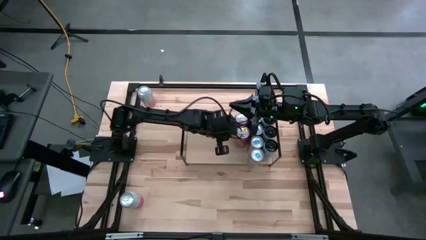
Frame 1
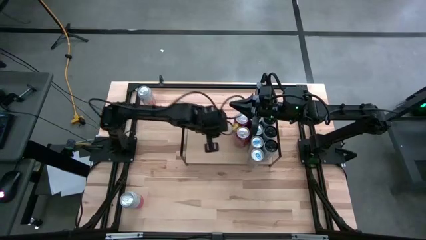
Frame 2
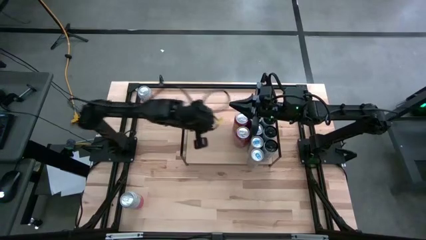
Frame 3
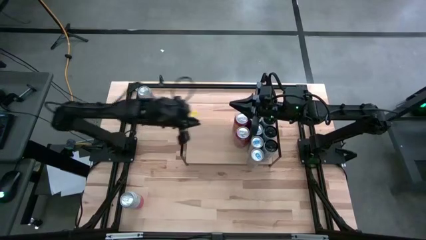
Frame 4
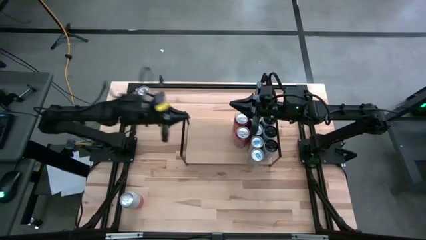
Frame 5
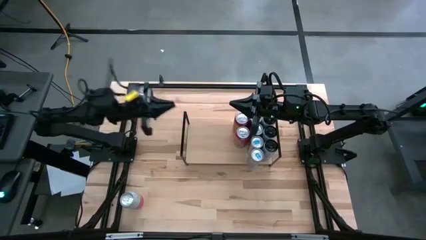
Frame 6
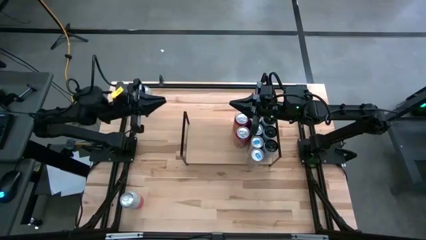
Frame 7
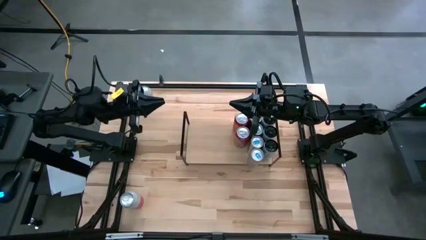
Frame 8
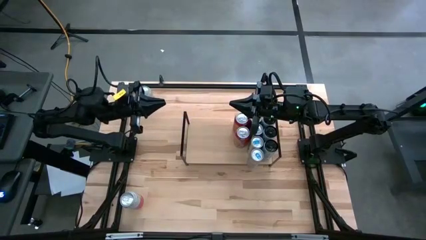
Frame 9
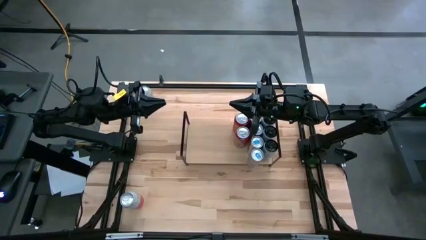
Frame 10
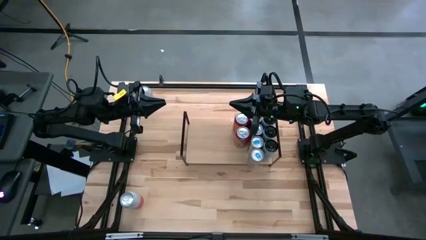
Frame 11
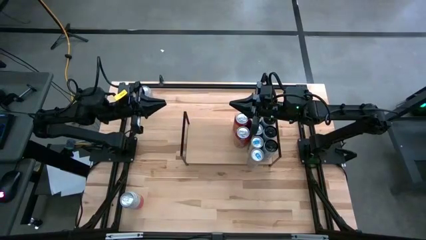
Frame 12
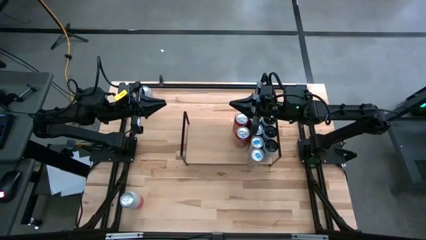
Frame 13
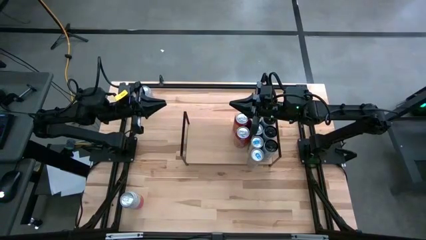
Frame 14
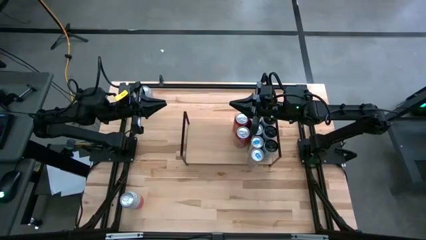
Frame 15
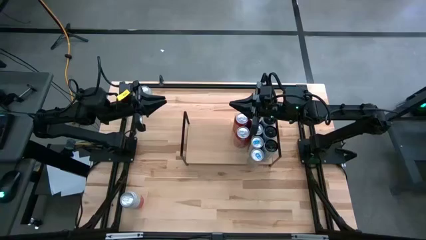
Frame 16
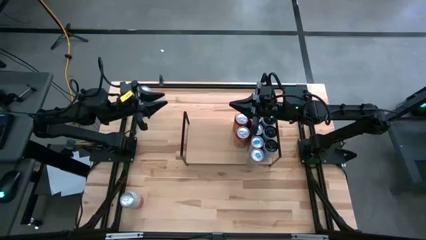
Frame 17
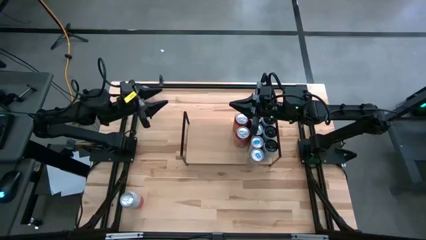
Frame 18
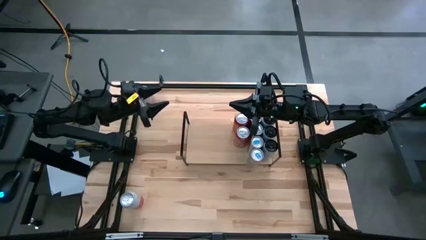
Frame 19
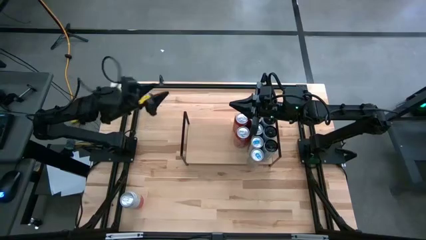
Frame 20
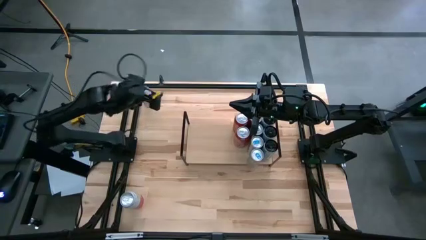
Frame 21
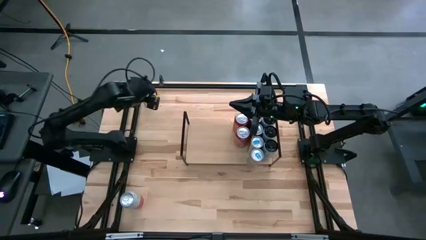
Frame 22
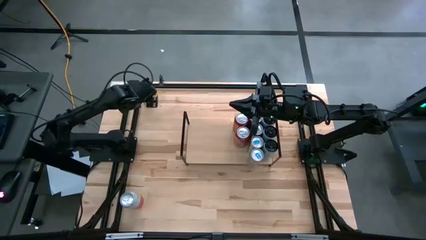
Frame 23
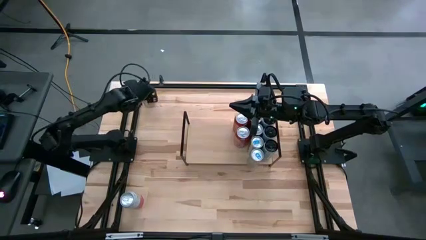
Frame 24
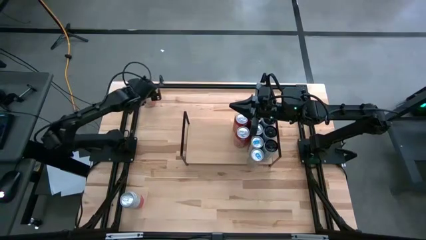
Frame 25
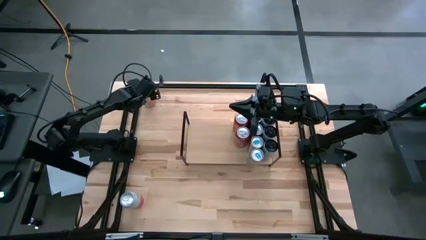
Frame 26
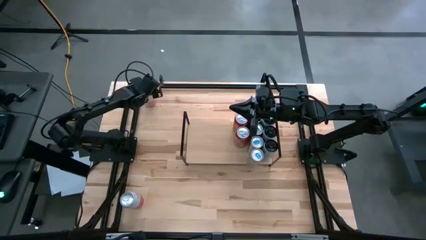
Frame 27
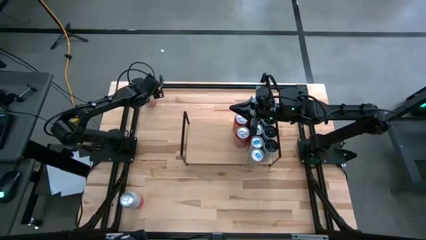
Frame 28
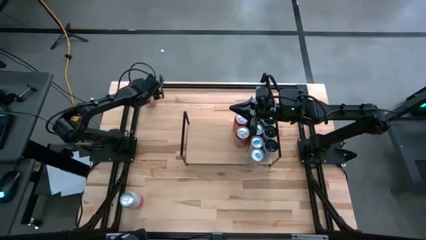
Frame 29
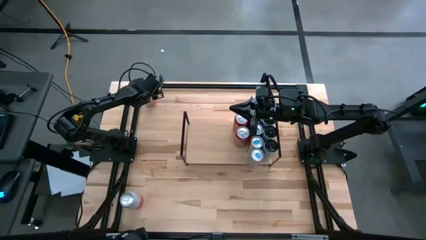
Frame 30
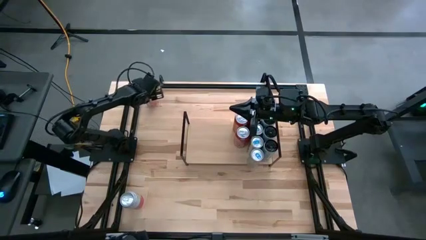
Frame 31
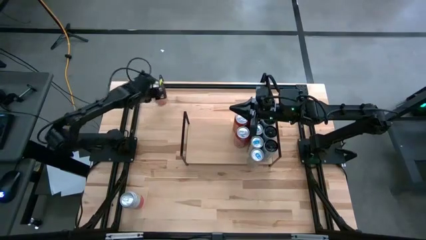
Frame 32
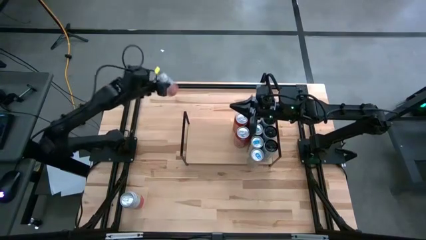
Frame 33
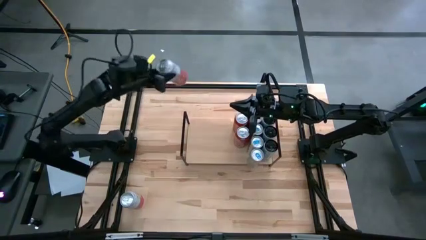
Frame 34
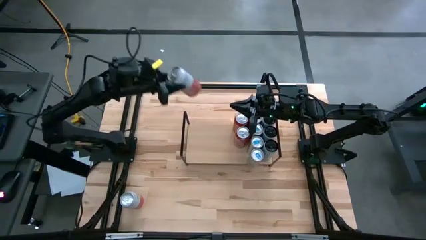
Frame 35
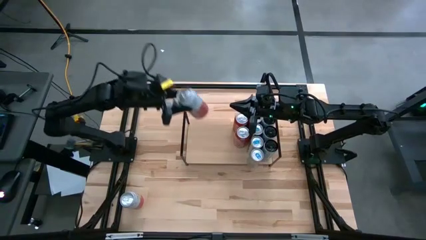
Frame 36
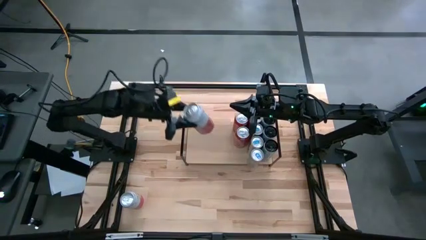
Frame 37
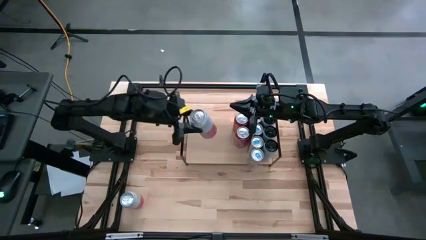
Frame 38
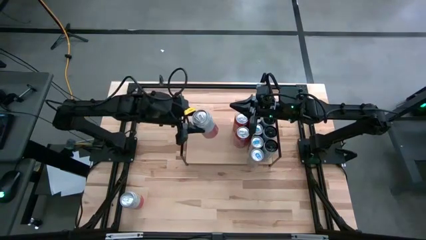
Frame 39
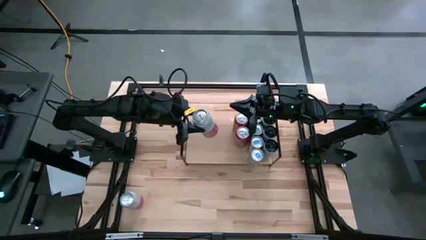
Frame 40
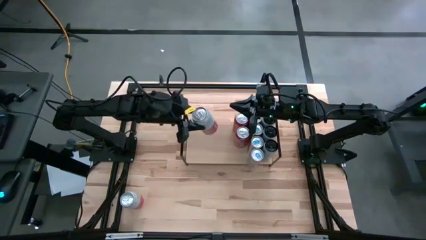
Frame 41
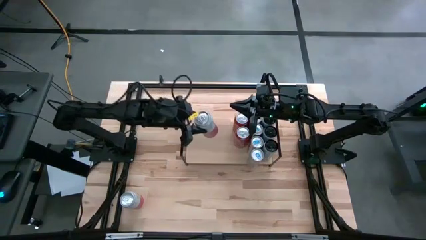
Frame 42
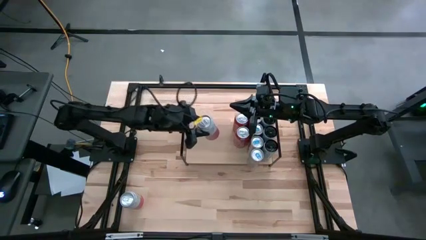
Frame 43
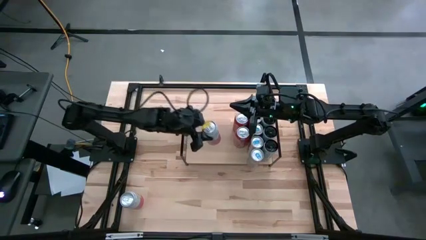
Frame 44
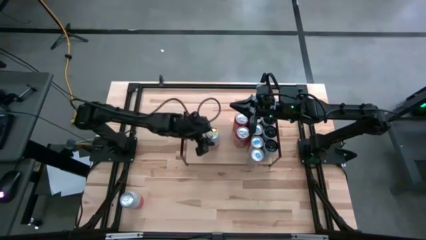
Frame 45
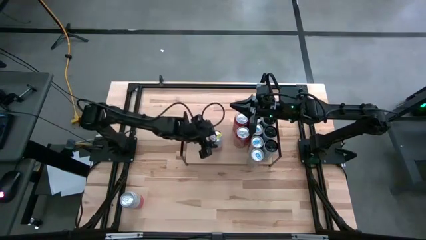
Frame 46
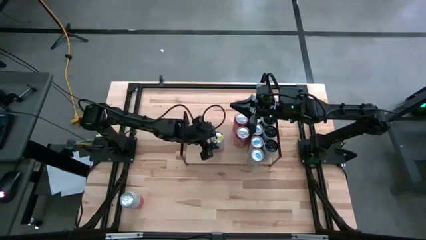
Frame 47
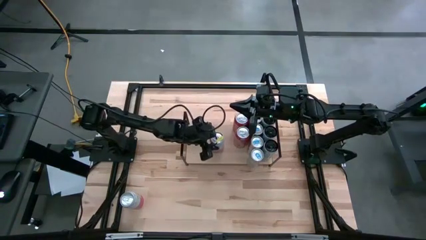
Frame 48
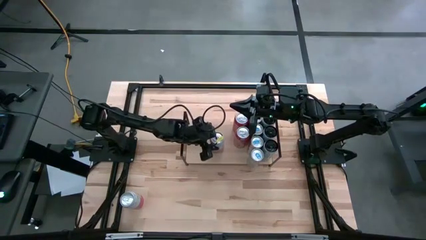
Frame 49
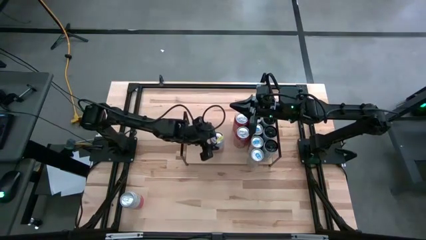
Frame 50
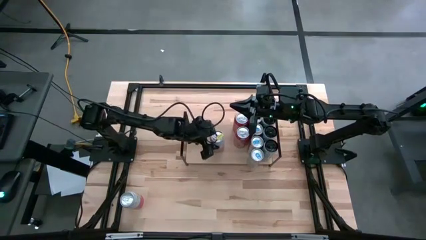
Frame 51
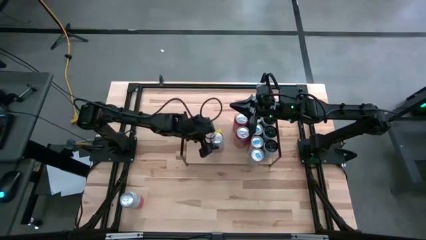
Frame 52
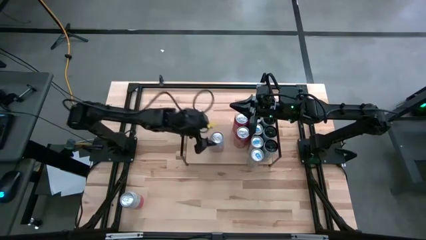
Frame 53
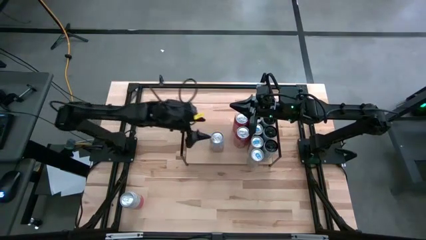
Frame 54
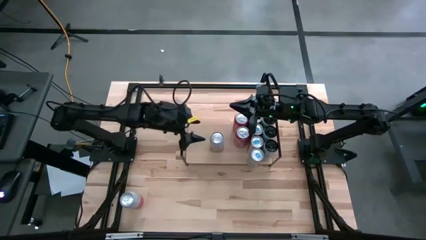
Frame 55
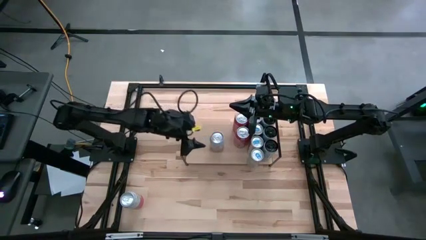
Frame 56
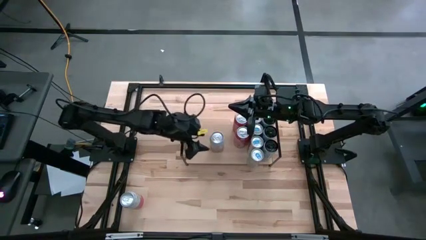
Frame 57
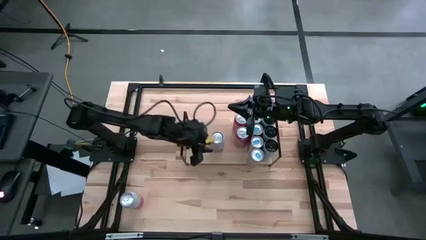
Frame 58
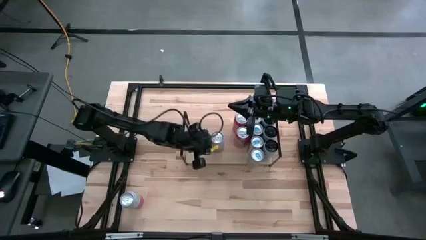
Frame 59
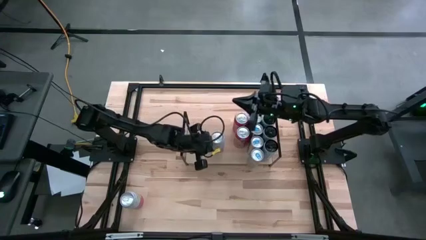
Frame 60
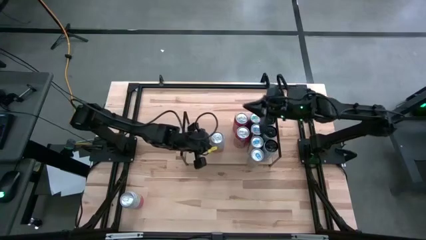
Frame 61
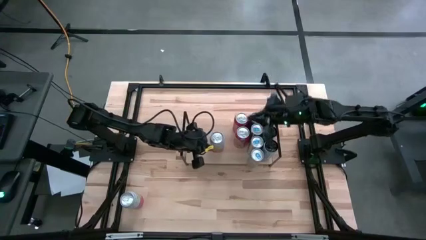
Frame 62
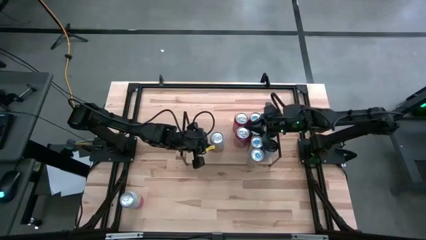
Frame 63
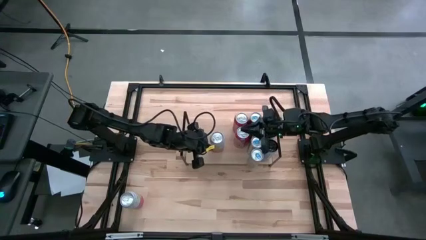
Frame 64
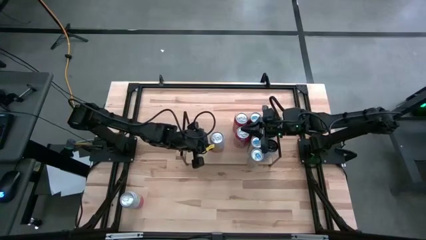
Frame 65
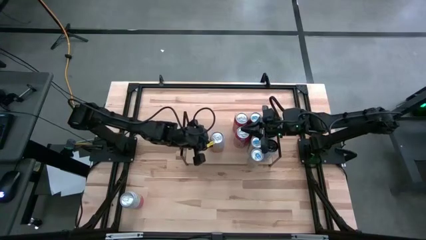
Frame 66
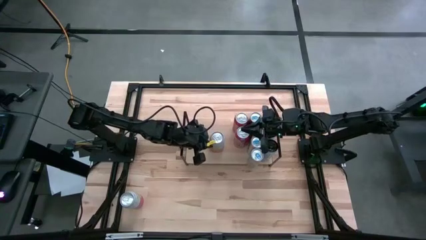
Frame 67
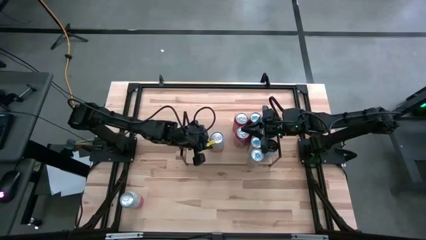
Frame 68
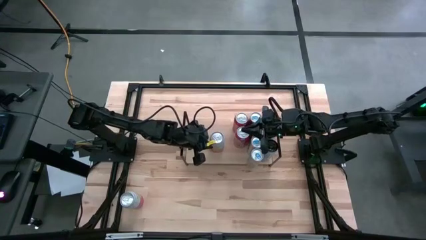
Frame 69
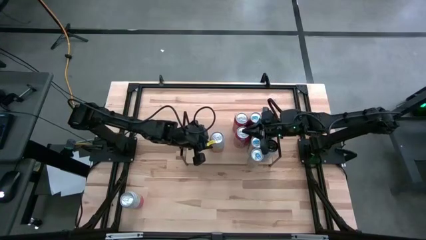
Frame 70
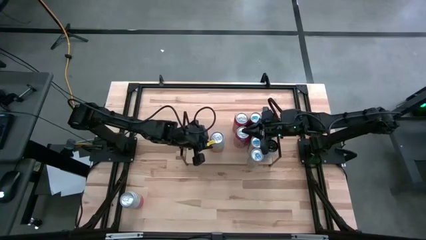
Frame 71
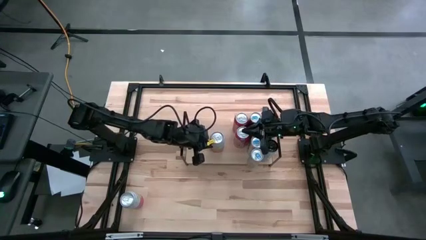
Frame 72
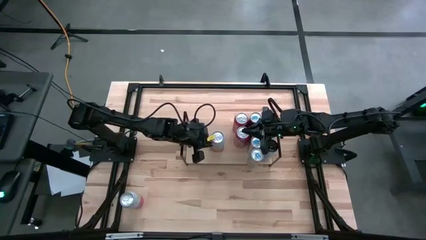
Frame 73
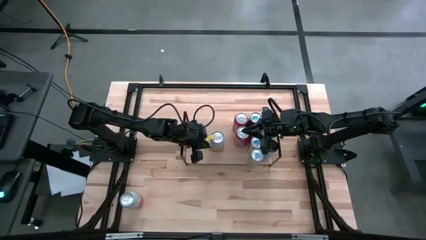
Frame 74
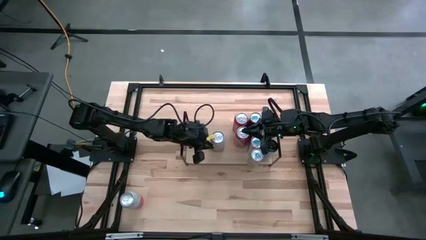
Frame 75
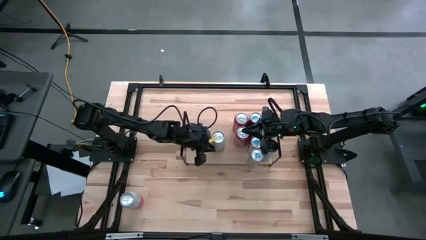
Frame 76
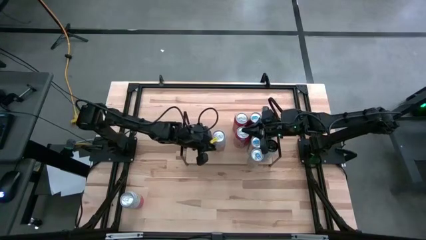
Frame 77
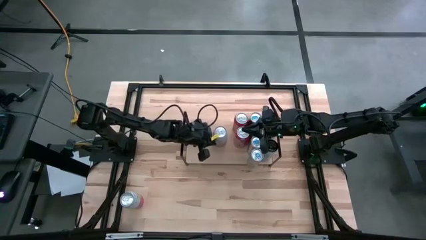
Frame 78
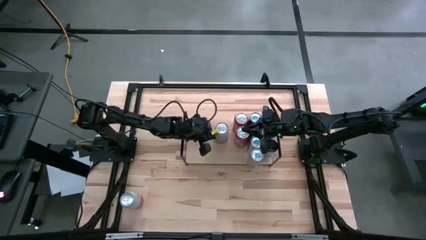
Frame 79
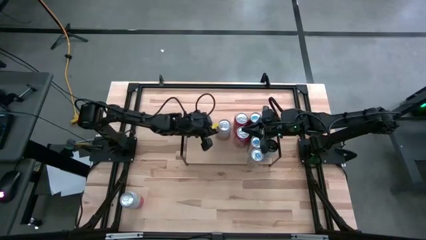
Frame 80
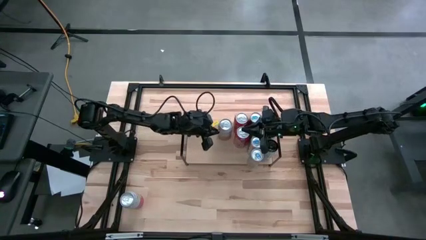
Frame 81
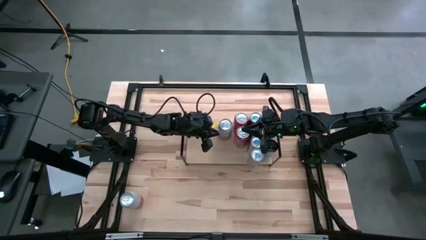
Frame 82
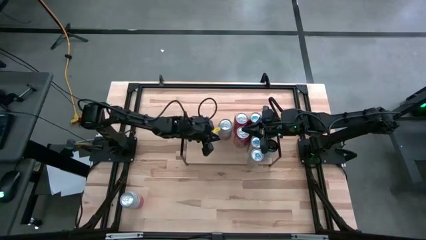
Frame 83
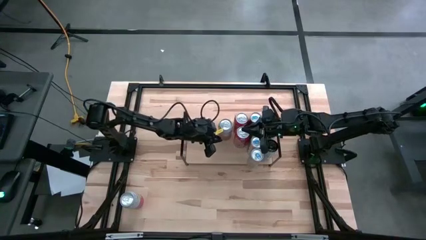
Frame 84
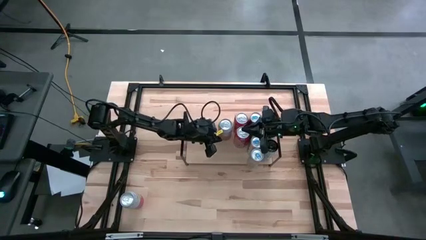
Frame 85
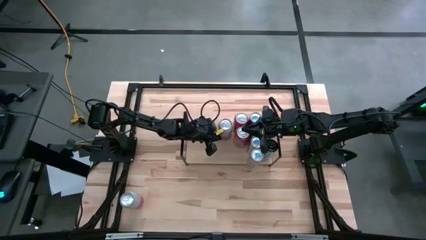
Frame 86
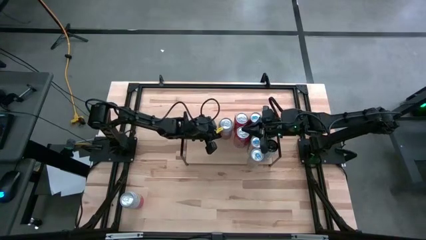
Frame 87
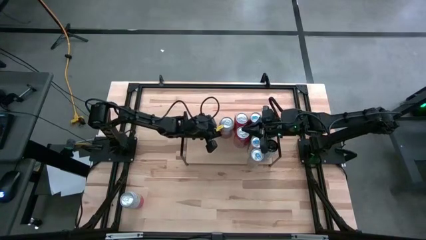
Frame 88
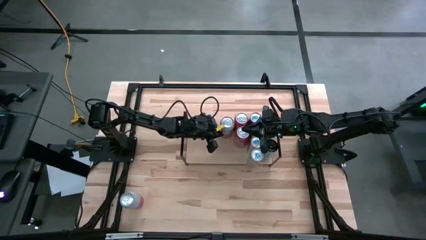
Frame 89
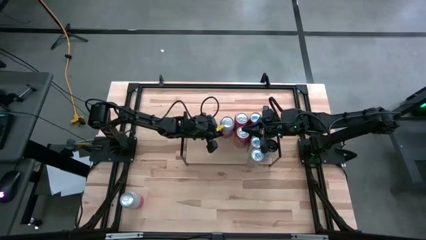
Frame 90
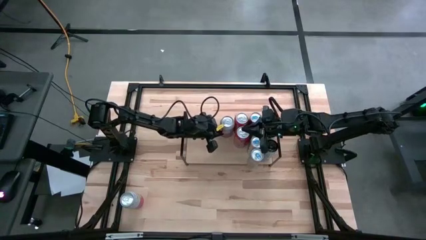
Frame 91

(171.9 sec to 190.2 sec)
Task: Place canned beverage on shelf
Put the white pink soda can on the shelf
